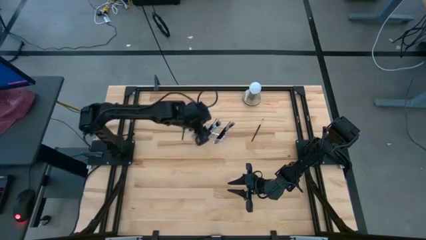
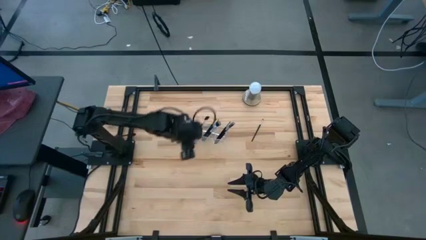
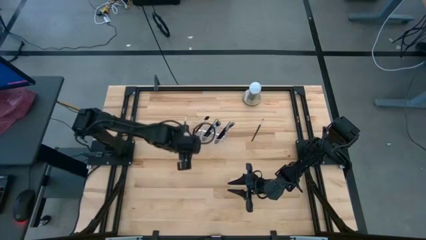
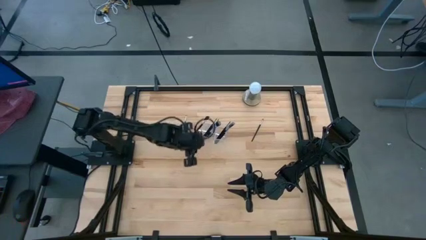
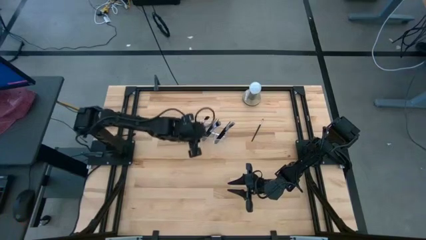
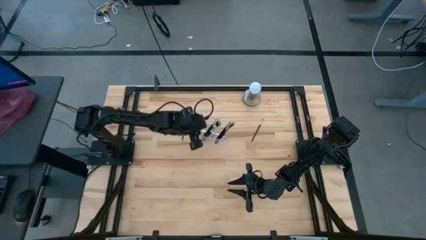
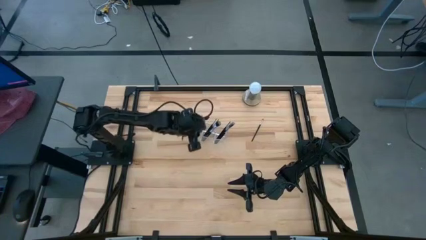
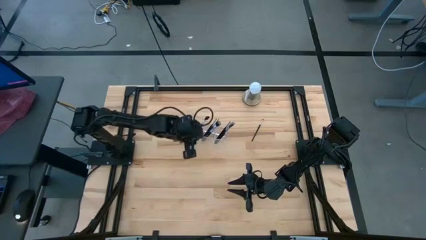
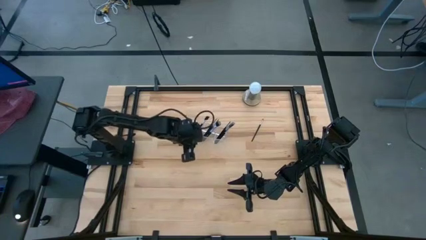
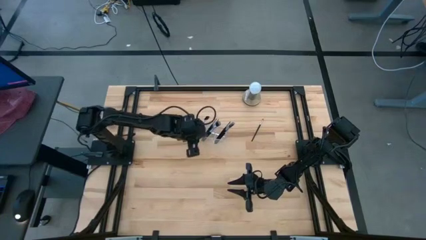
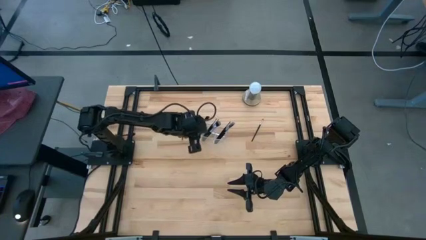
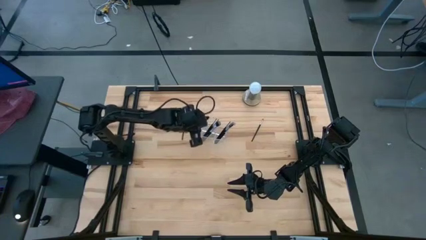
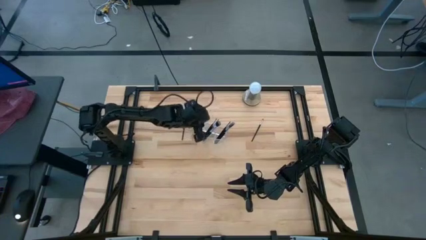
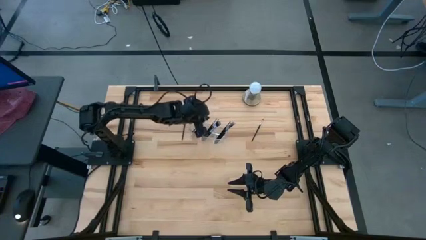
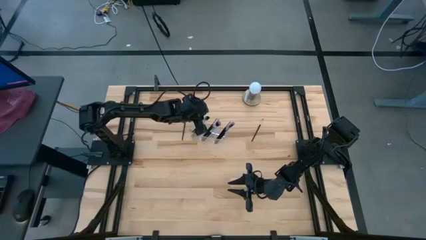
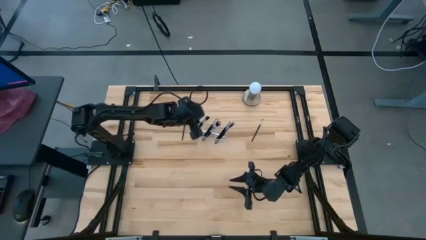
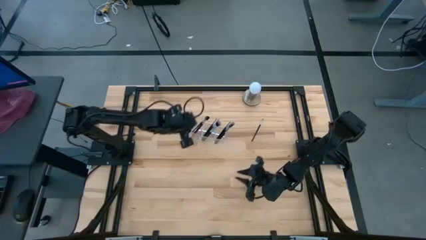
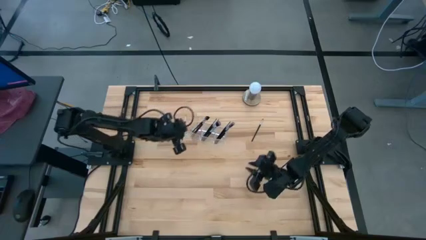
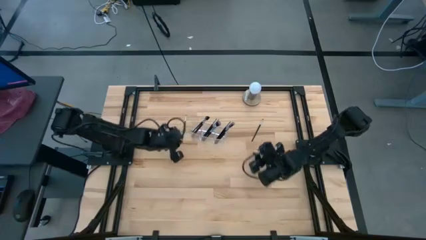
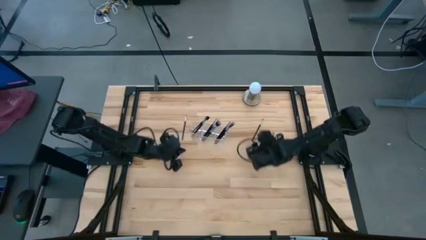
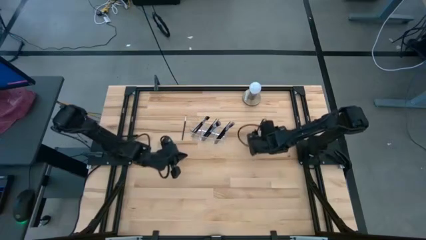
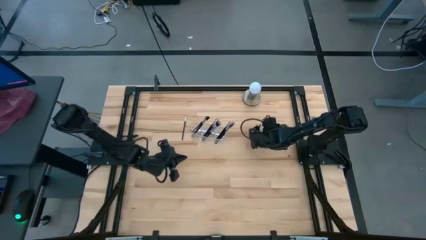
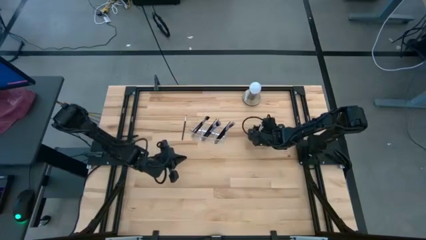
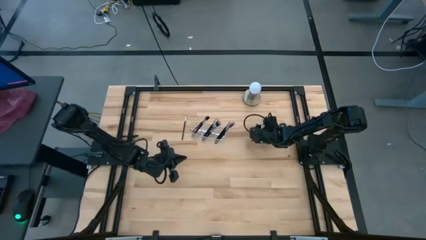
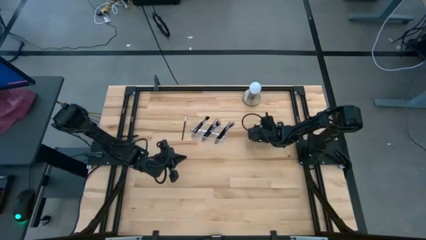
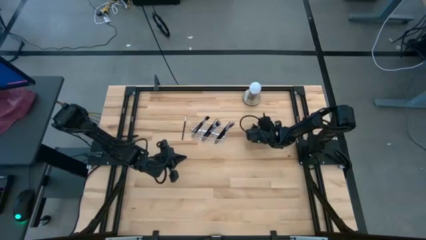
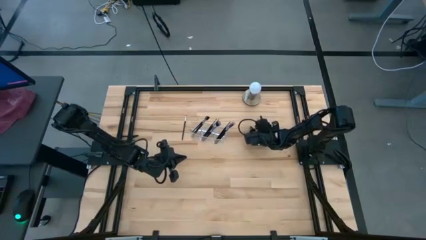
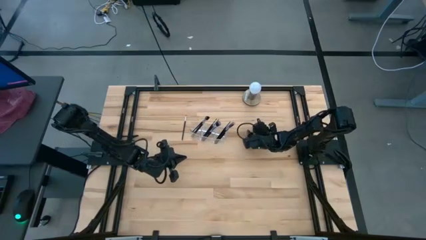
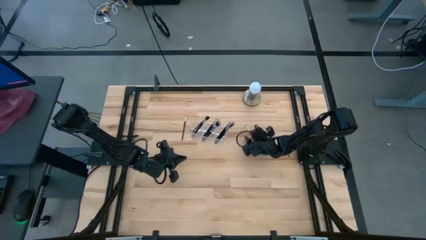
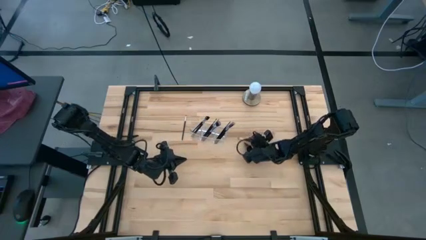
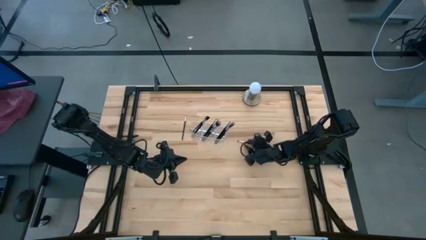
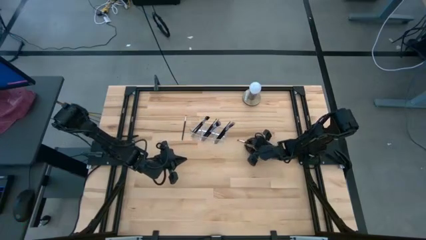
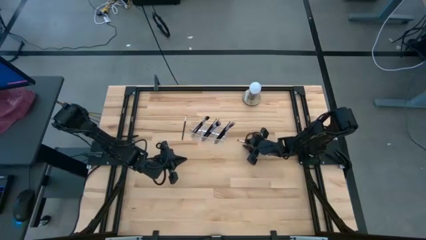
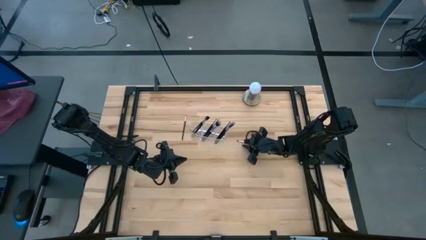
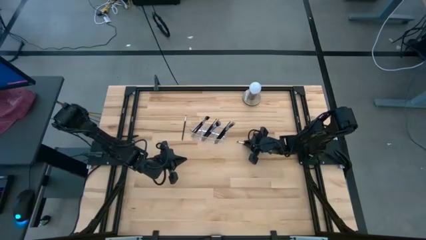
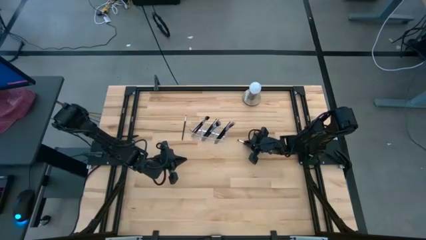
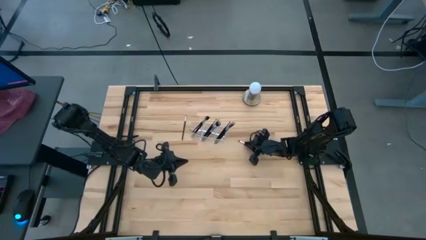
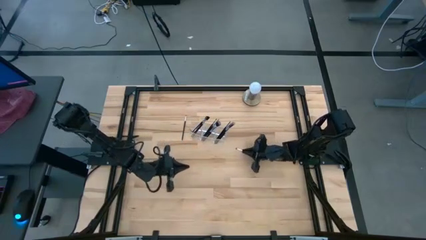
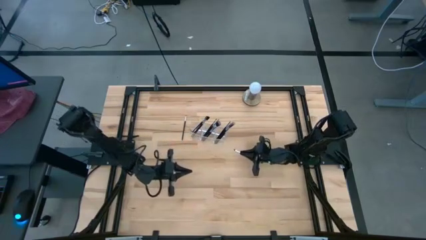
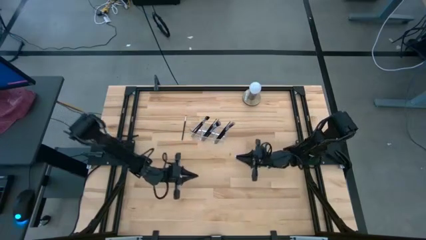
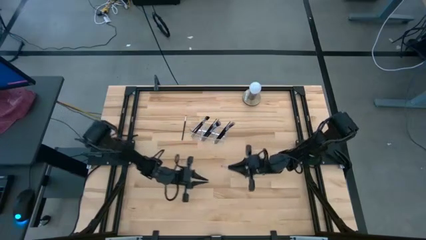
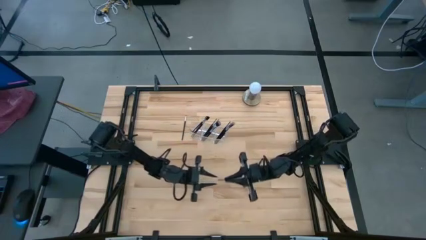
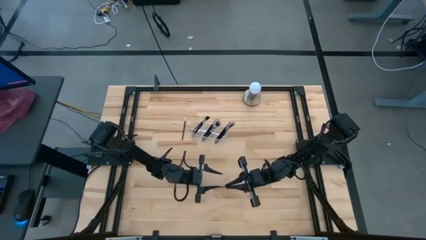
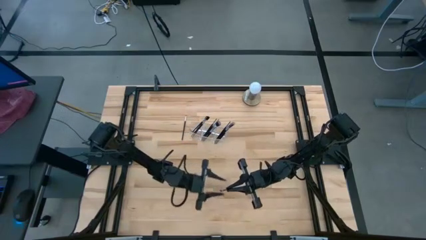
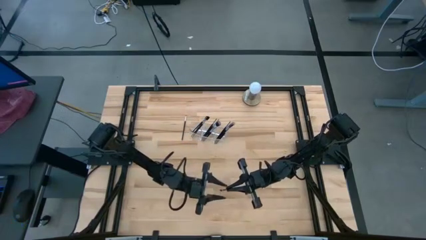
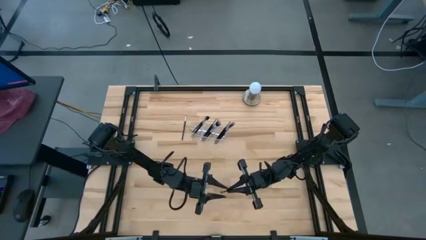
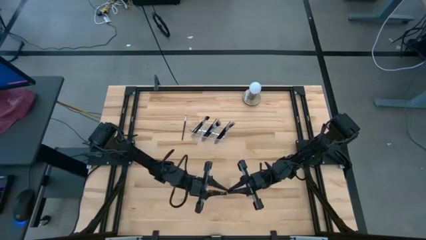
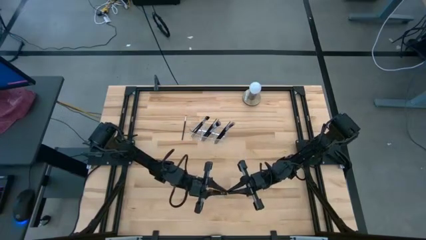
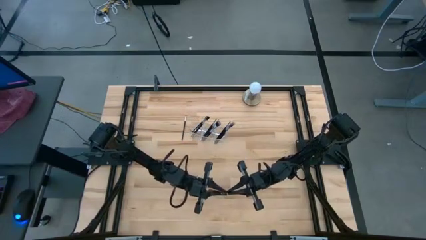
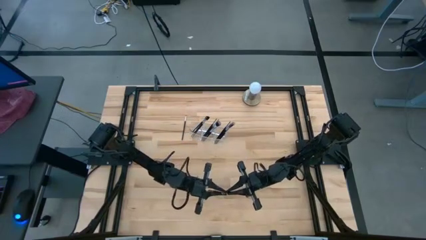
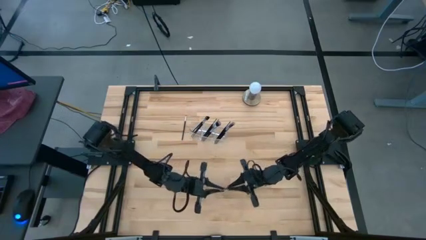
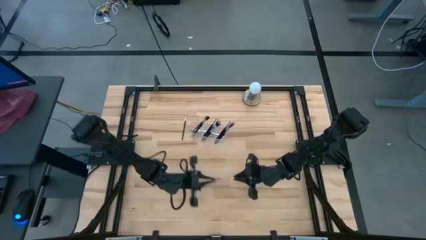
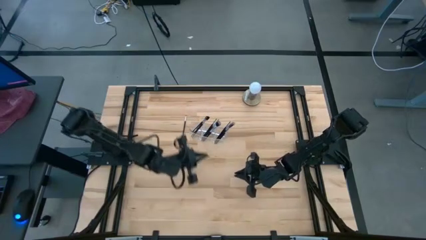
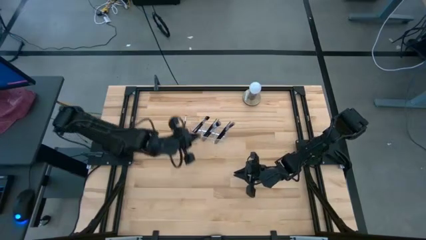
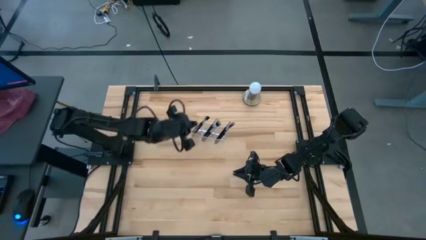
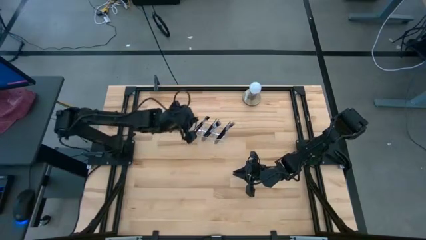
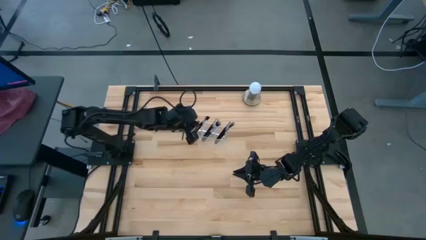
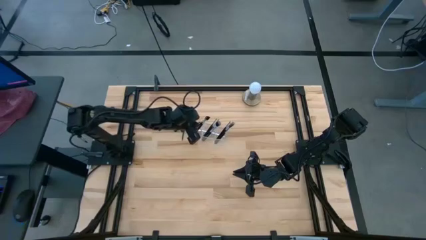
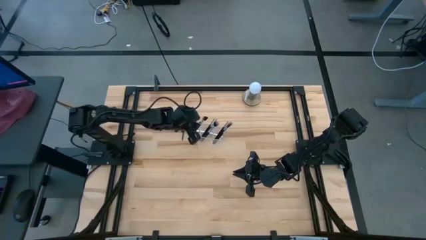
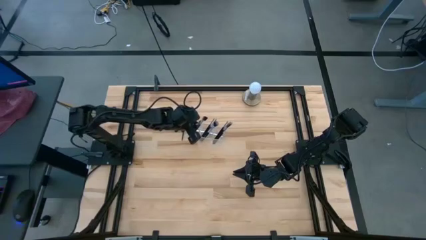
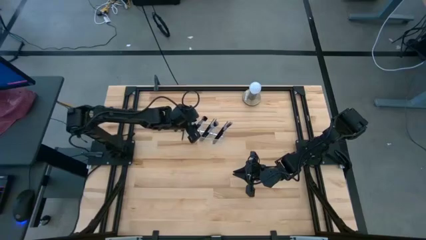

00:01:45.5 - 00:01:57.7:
Task: Put items in baskets/containers
Put the eyeshadow brush into the transparent organizer

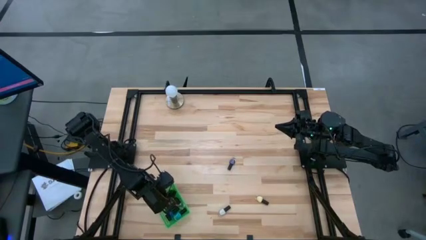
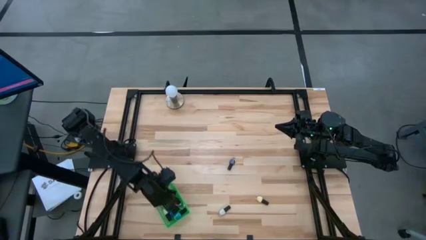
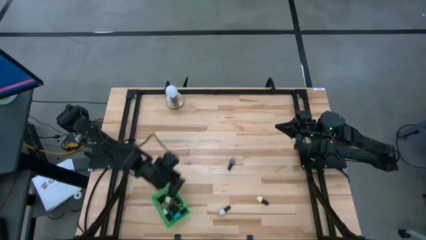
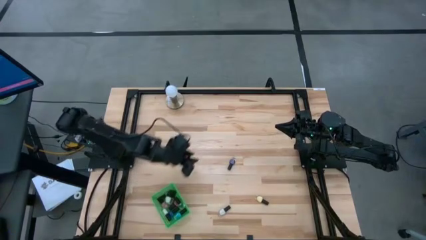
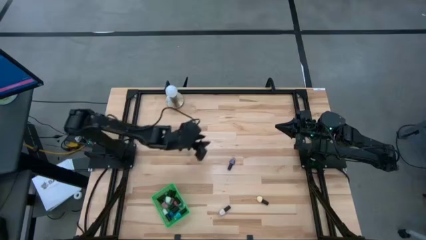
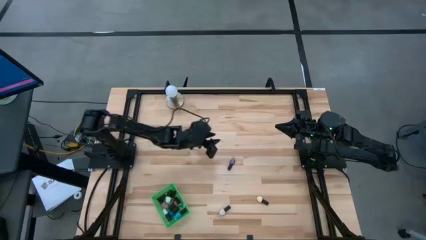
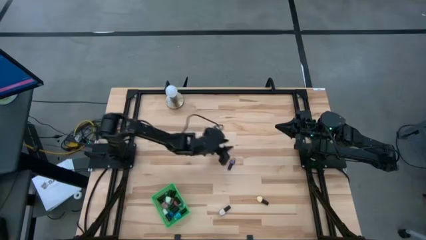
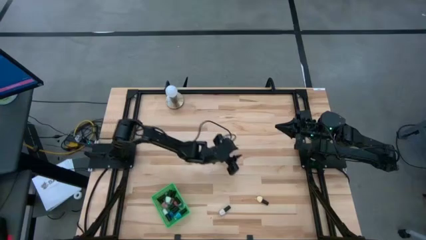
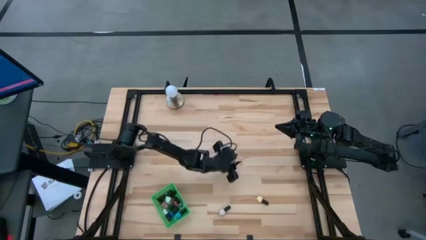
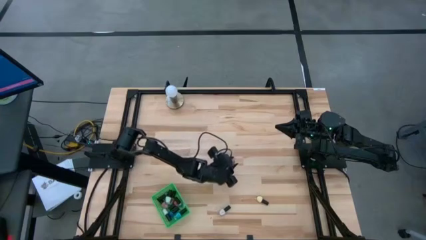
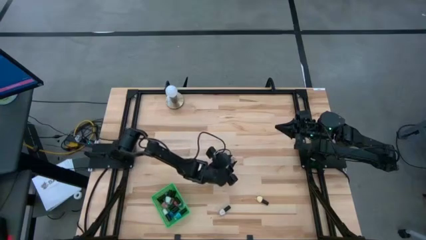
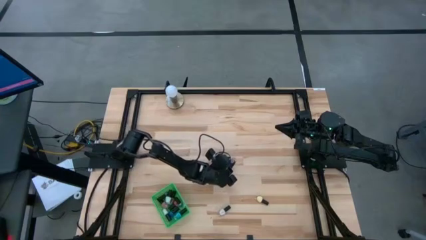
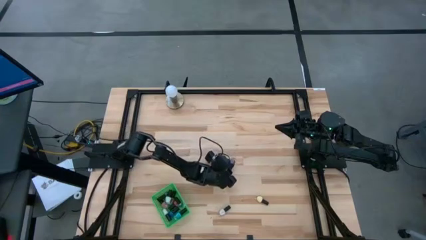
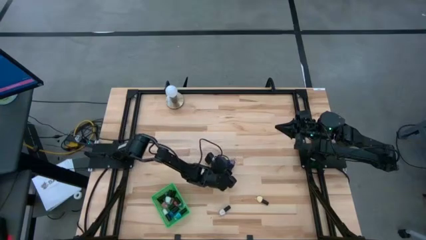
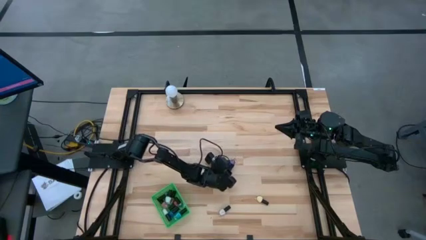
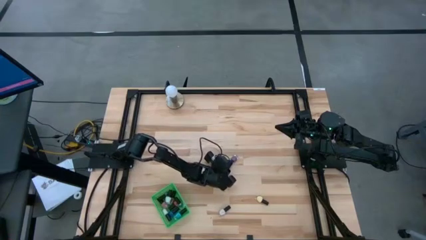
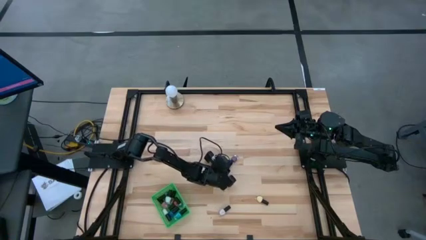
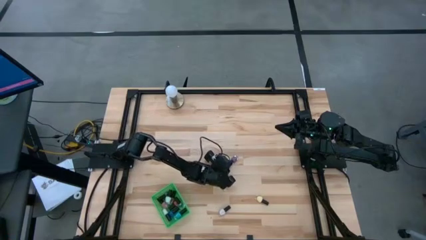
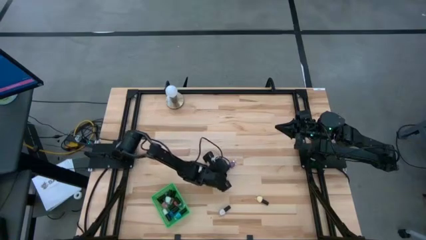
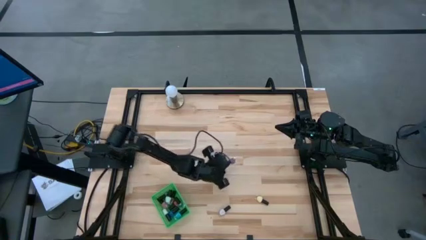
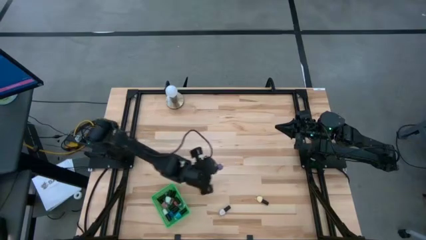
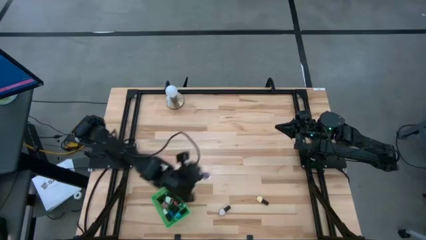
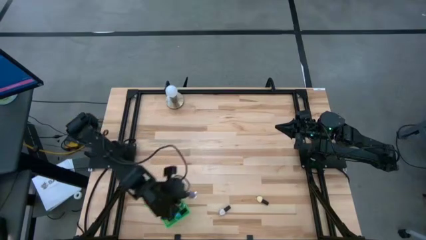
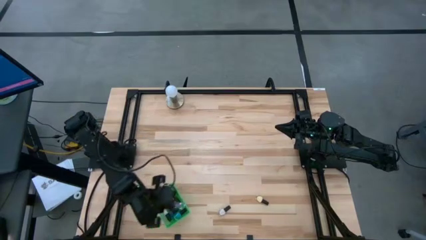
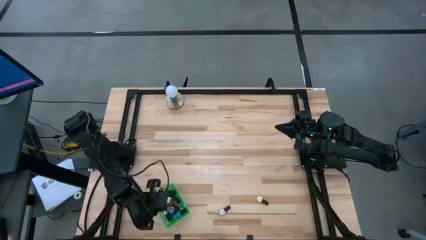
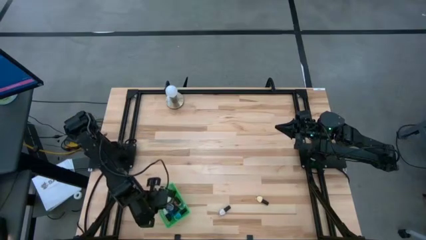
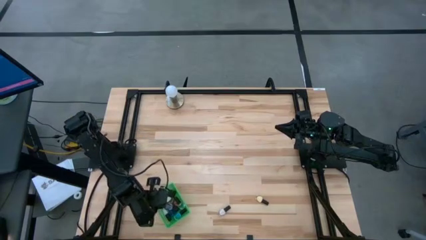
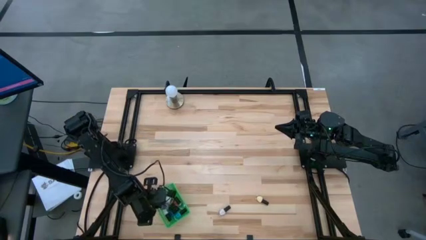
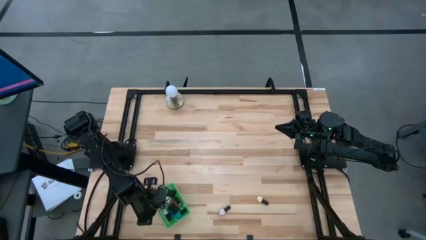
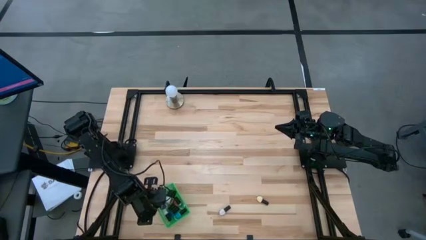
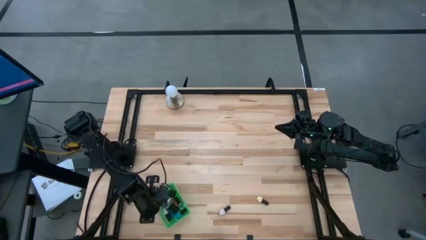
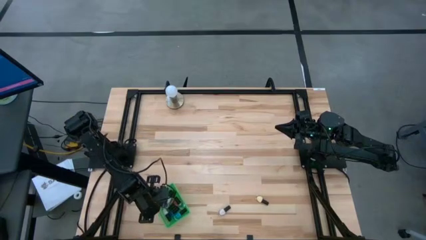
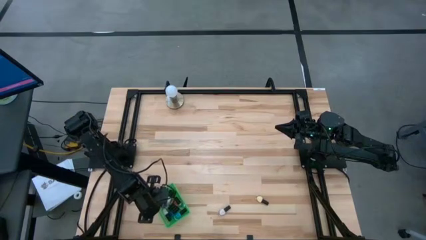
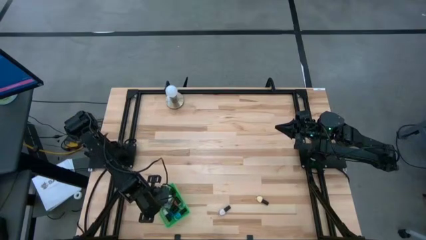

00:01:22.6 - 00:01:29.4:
Task: Pick & Place Nail Polish
Put the black violet nail polish bottle into the green basket
